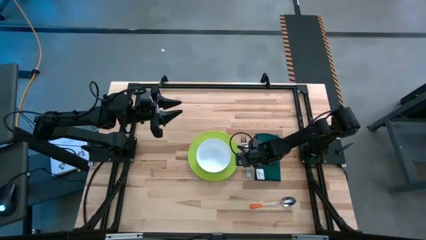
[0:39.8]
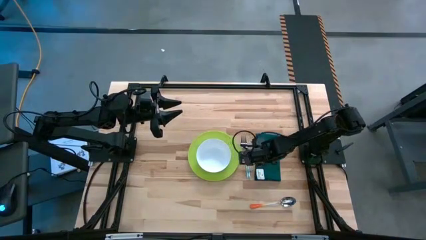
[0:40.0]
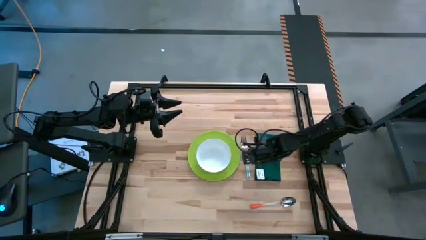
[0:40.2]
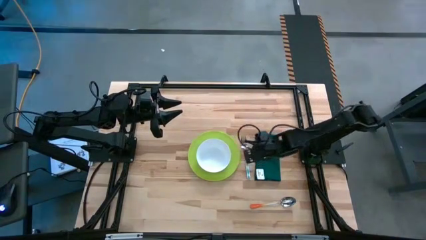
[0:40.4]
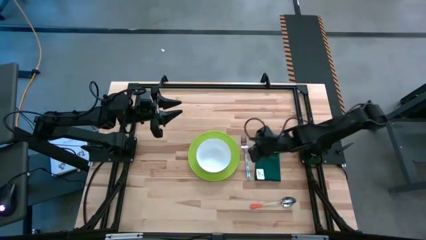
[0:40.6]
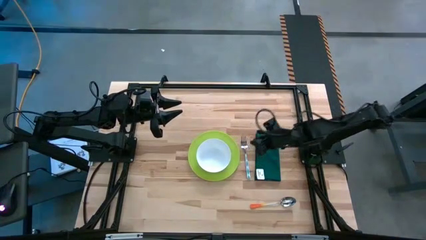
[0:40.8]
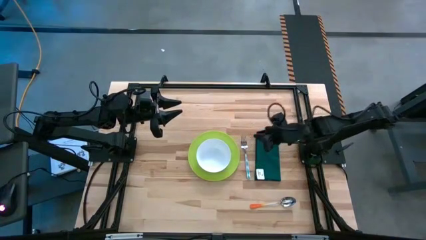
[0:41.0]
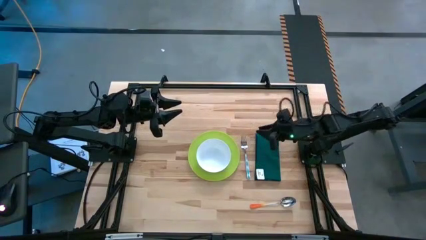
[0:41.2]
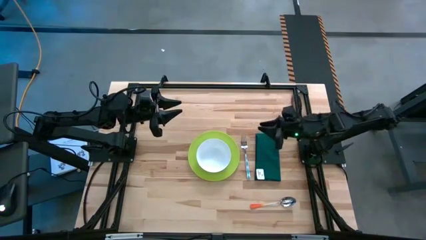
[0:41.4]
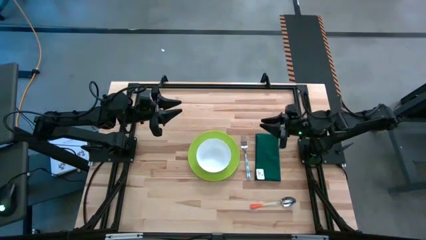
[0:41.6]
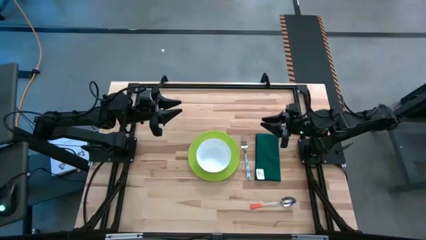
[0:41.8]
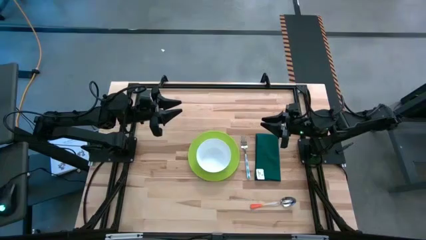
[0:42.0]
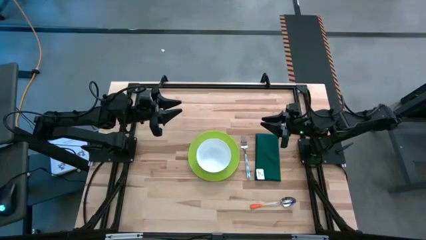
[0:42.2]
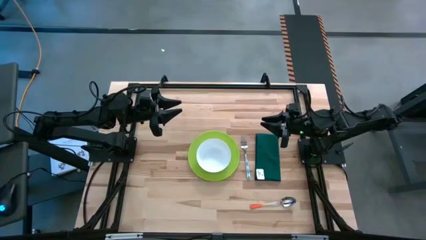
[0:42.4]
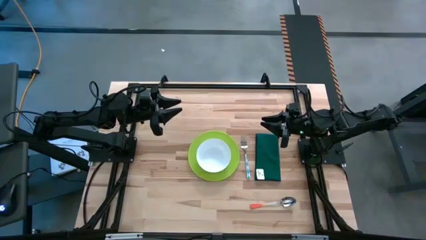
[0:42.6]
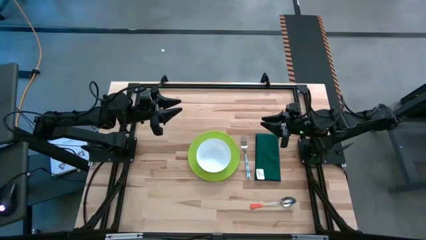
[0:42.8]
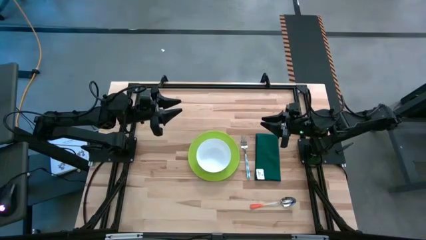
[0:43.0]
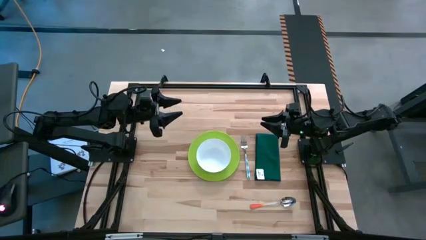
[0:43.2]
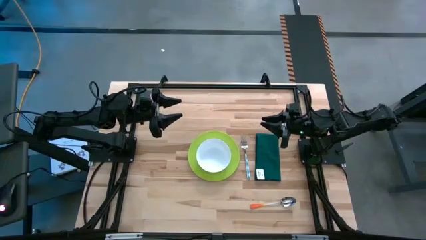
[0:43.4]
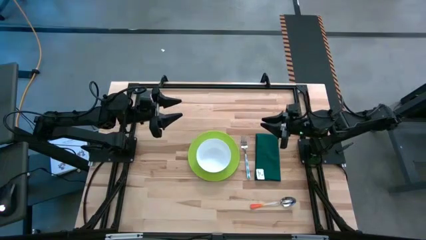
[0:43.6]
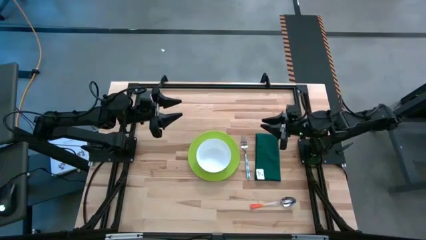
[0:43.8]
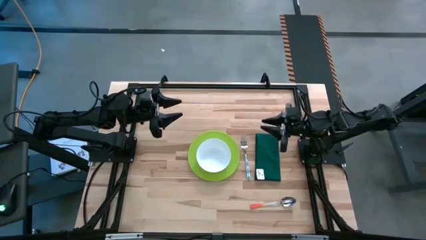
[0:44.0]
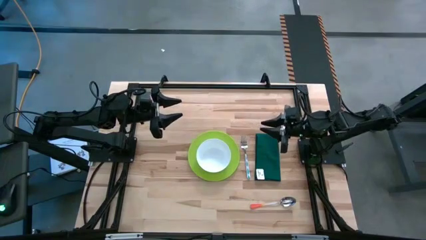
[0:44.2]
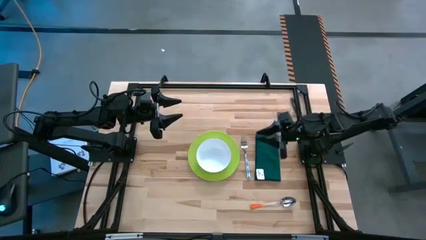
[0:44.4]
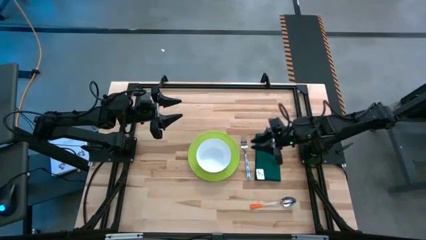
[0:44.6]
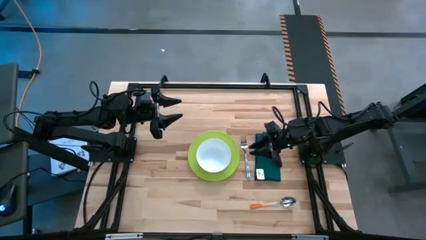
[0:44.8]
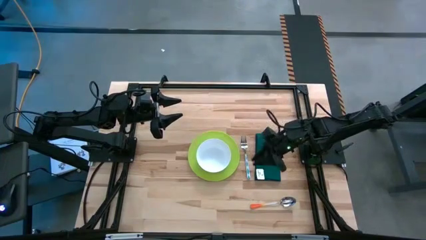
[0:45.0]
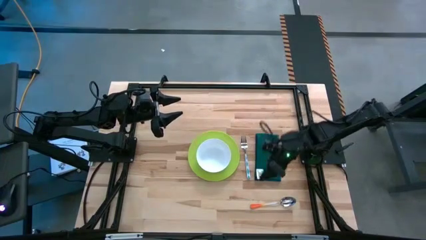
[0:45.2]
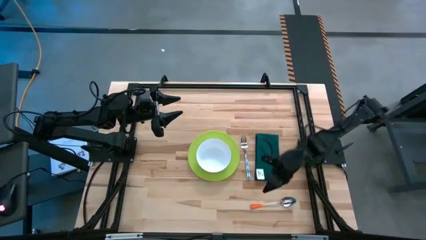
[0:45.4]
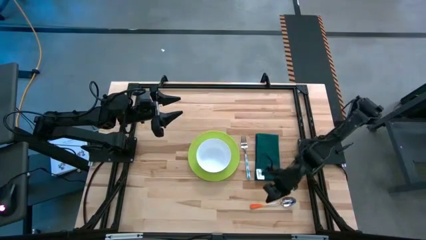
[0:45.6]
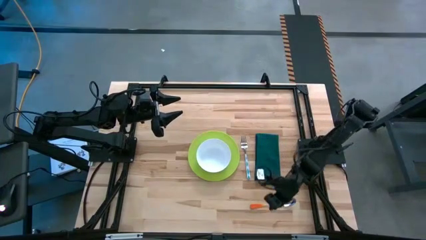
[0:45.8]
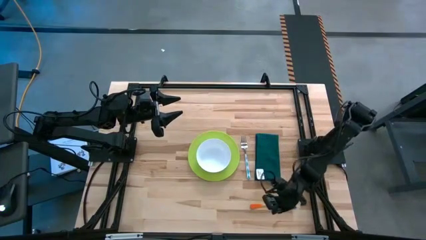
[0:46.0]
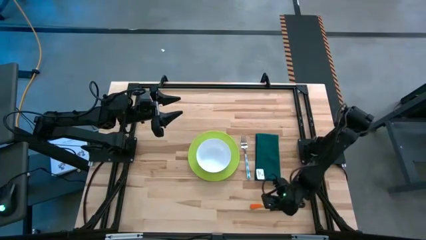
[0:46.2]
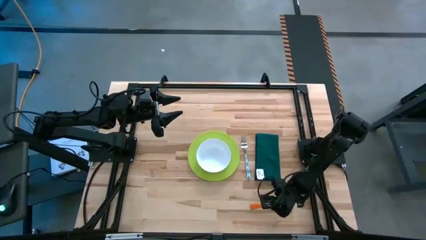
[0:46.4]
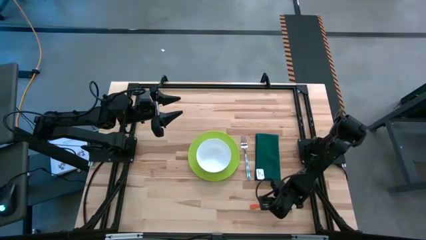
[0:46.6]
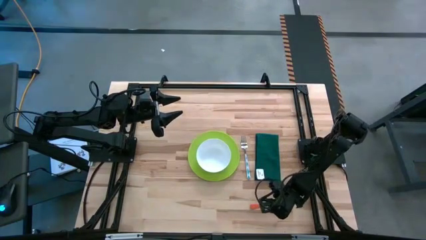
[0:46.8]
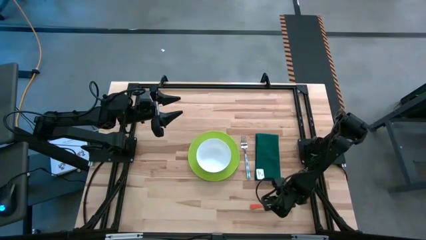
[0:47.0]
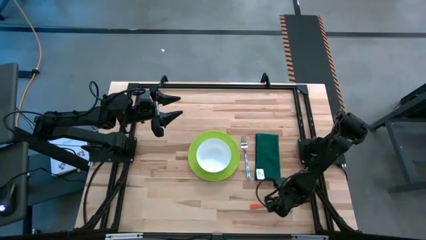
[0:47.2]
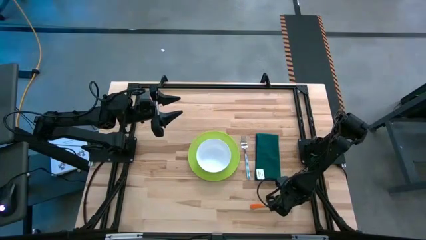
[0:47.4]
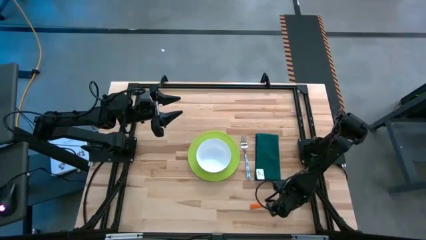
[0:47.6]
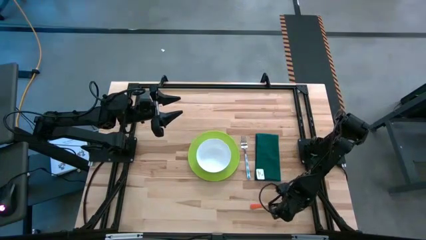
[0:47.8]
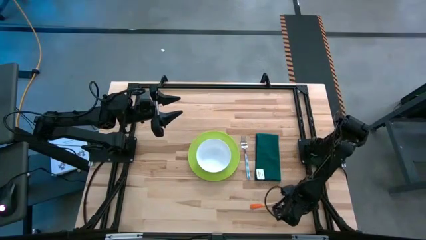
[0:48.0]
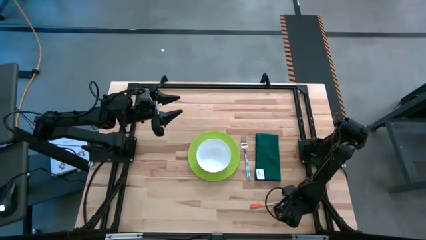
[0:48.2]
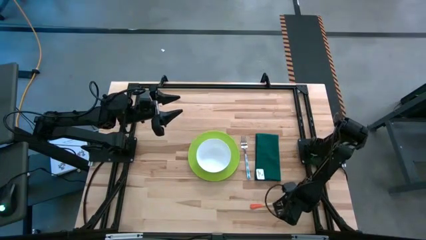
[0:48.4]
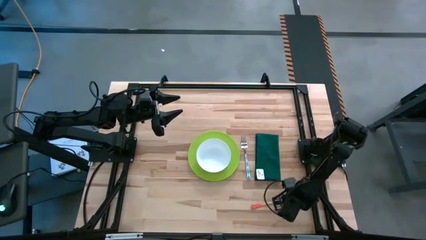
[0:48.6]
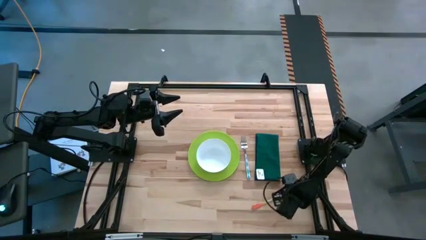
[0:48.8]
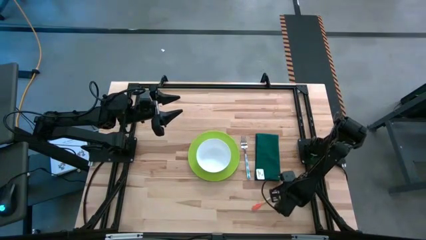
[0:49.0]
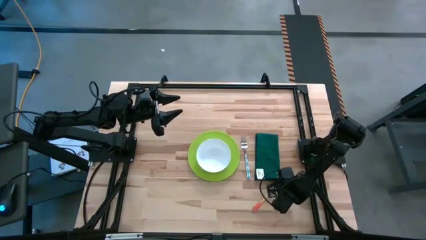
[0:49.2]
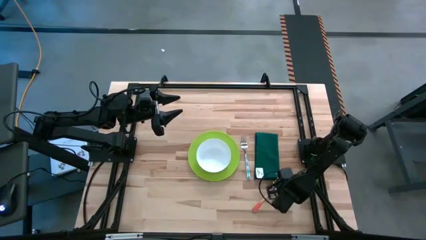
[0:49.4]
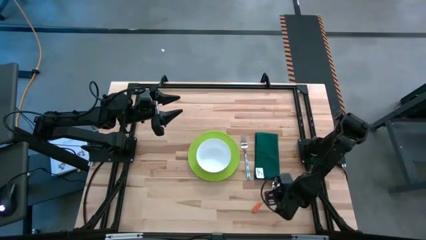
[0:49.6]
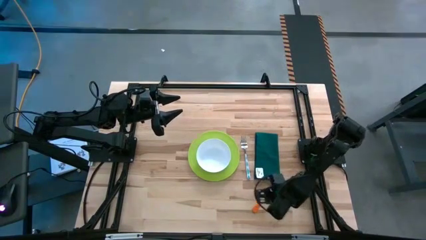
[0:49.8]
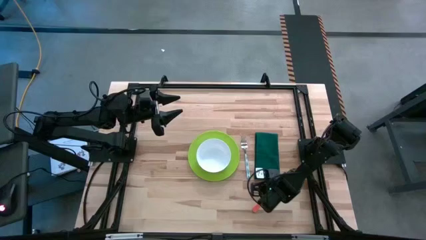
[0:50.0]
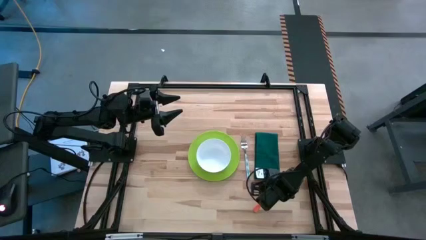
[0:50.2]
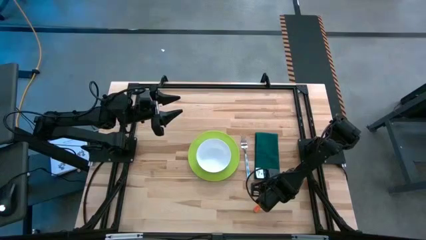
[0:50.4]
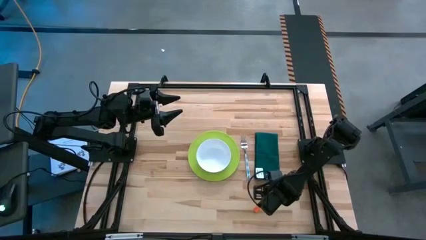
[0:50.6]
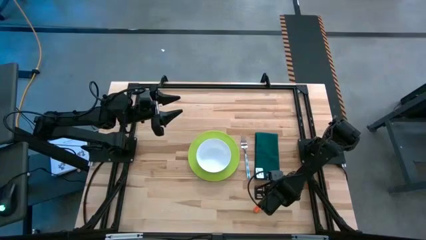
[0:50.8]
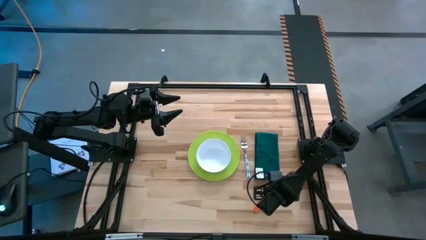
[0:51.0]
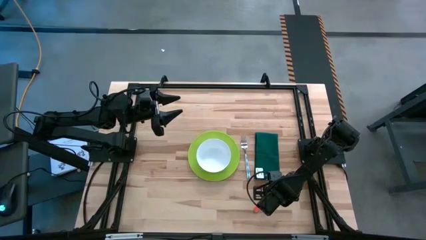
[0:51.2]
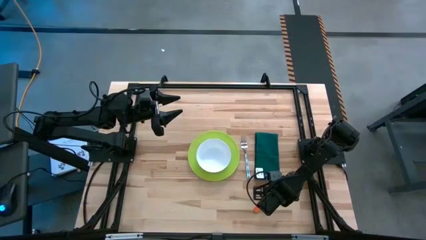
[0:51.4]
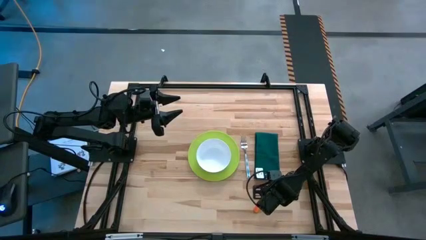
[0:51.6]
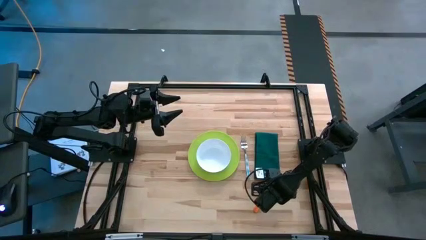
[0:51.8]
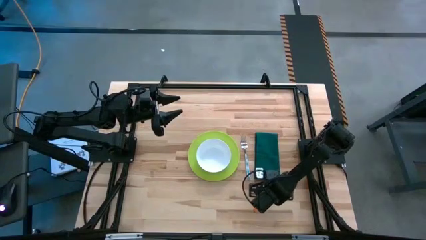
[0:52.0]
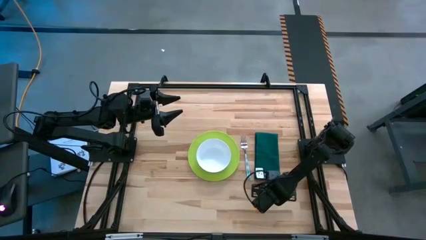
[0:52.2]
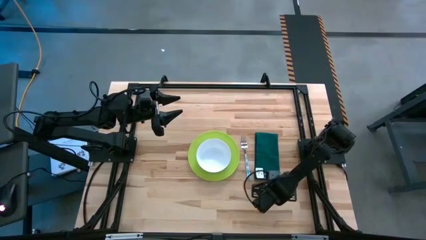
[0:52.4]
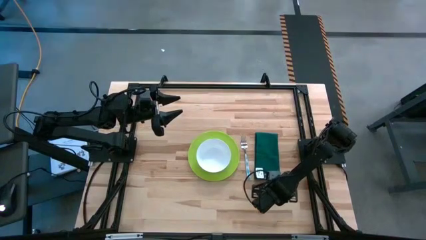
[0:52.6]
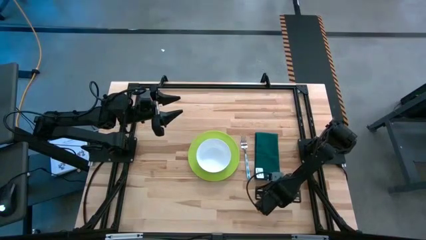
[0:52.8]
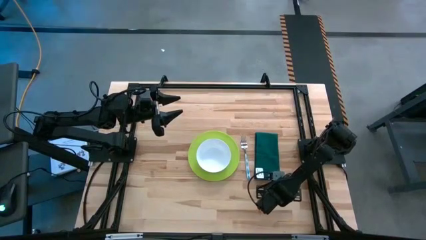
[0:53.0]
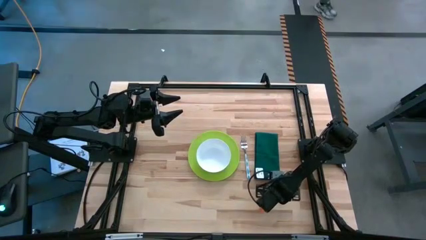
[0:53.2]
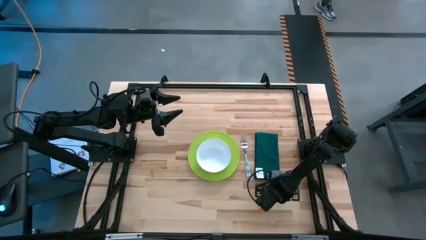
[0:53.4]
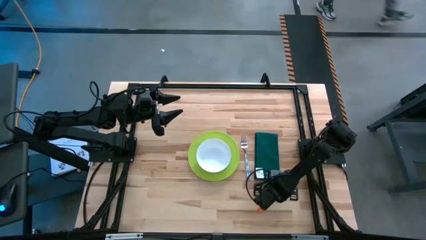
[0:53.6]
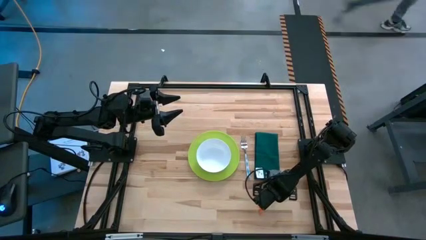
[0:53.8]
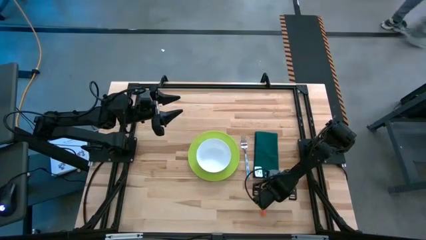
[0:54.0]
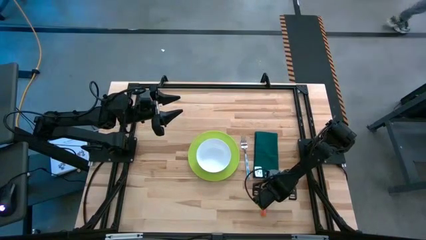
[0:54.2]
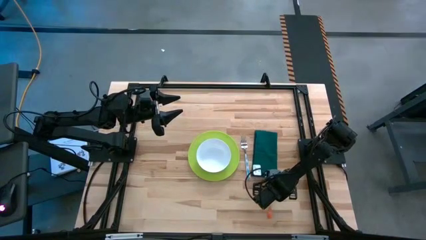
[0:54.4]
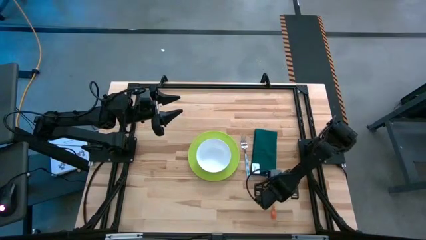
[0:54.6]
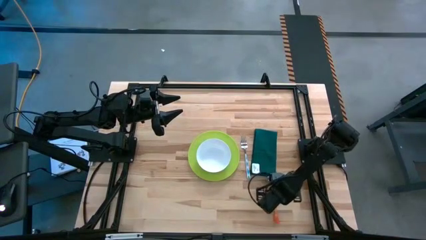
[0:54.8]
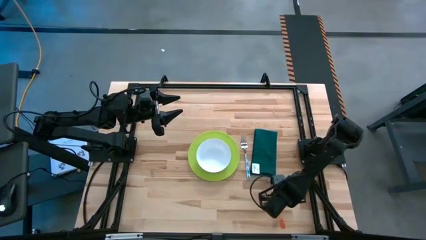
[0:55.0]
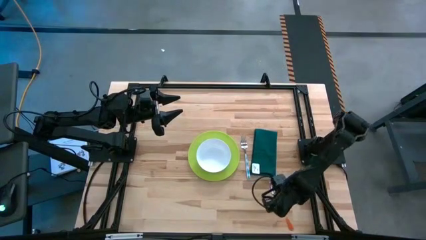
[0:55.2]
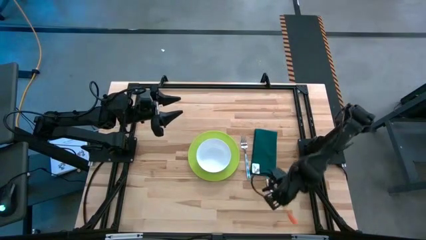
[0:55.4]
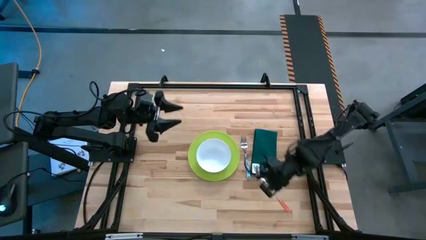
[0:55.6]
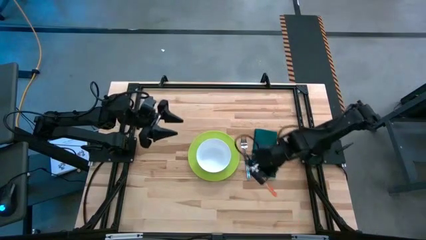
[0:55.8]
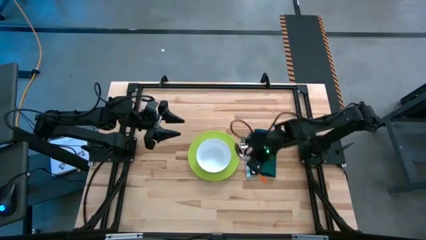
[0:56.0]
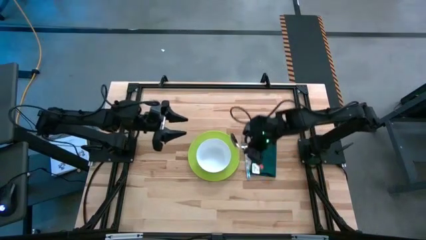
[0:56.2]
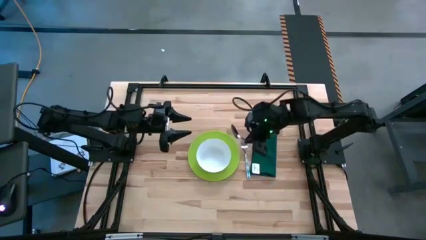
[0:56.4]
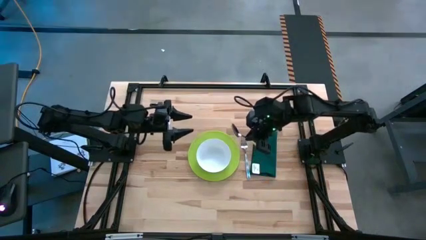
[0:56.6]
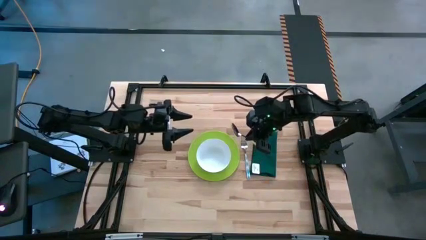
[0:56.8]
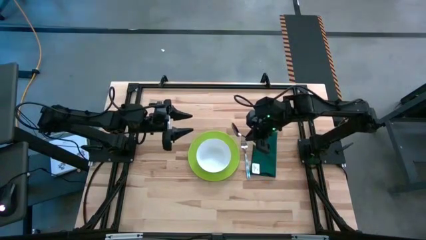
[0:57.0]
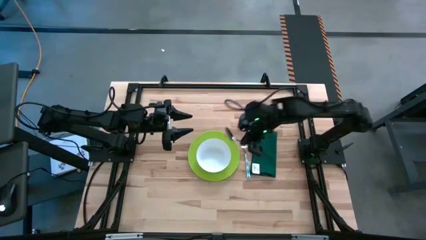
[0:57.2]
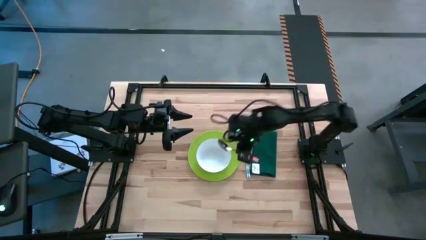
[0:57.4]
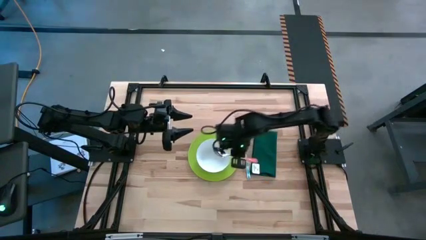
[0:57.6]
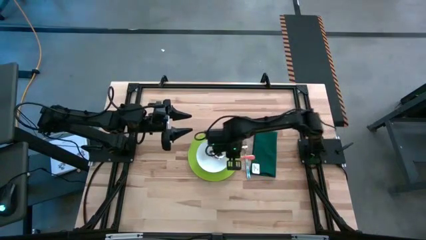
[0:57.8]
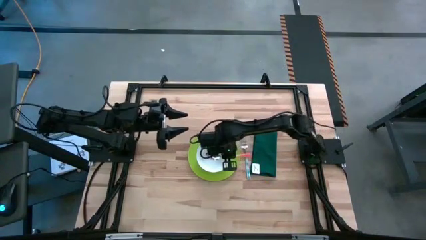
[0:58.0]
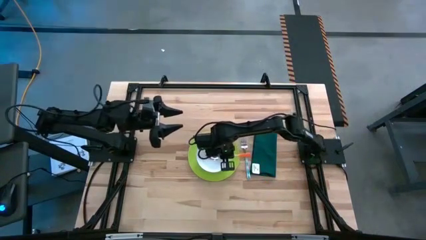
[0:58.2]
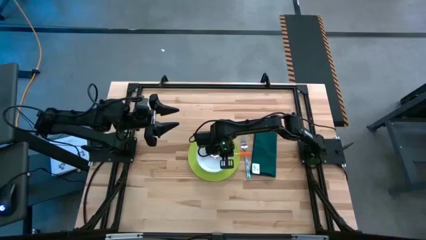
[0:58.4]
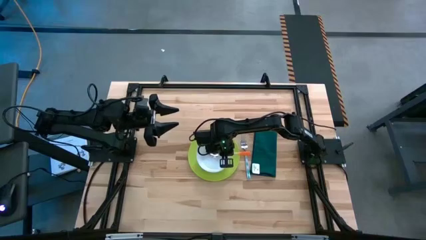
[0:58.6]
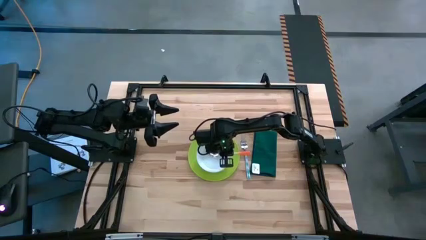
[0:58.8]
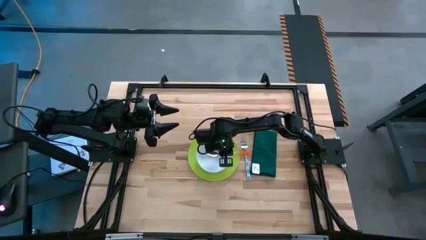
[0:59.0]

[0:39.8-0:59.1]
Task: Set table place
Put the spoon into the white bowl
